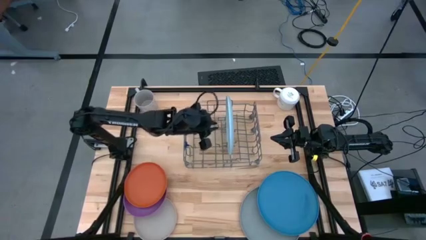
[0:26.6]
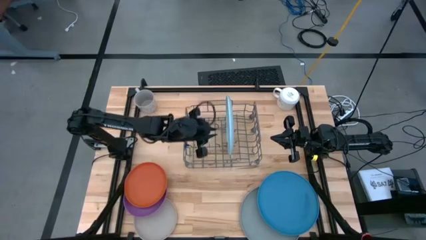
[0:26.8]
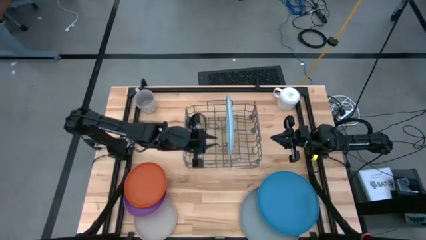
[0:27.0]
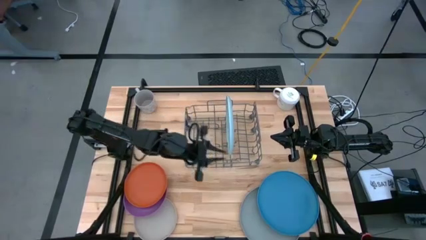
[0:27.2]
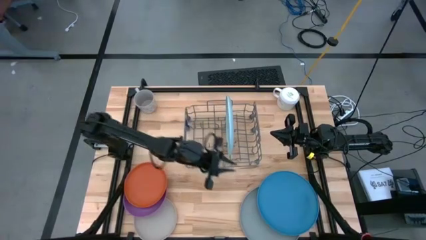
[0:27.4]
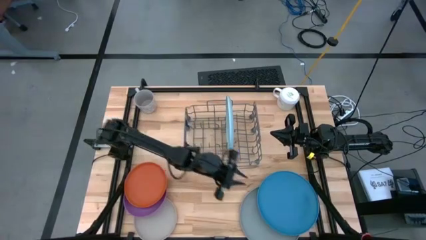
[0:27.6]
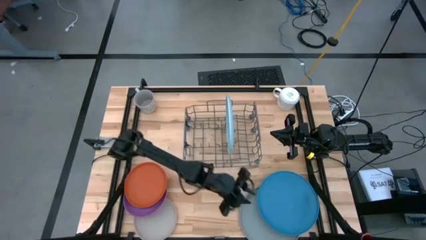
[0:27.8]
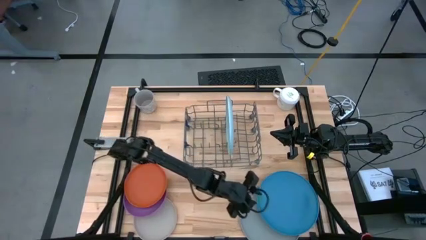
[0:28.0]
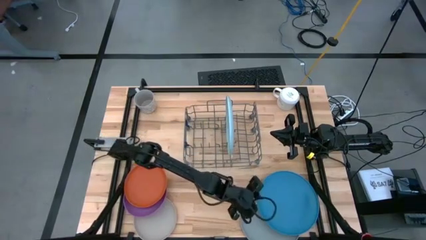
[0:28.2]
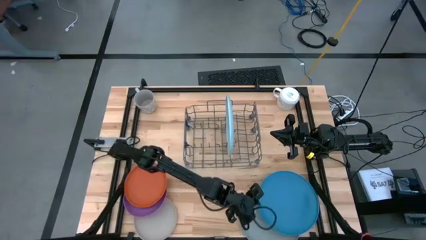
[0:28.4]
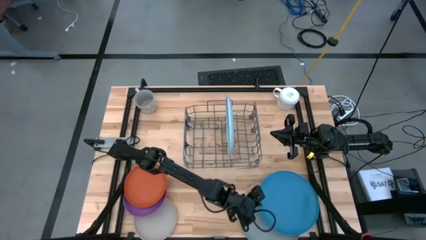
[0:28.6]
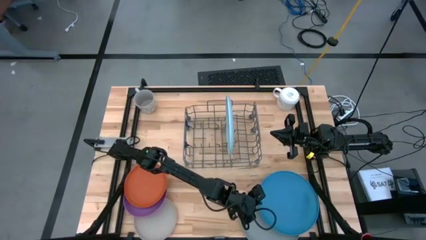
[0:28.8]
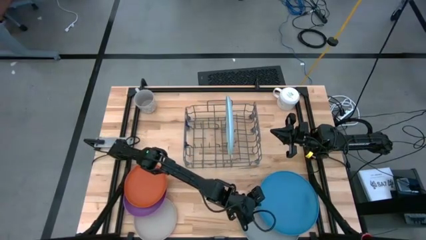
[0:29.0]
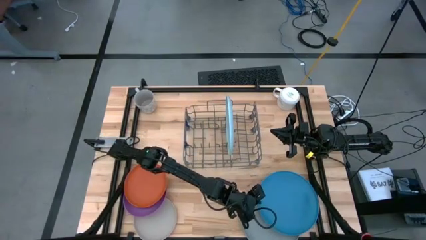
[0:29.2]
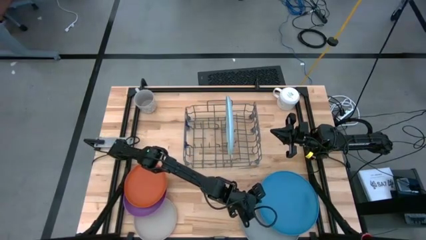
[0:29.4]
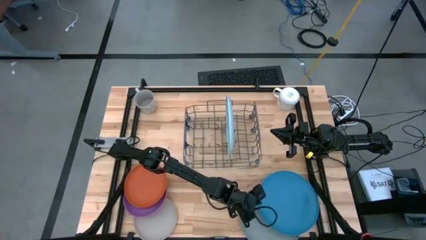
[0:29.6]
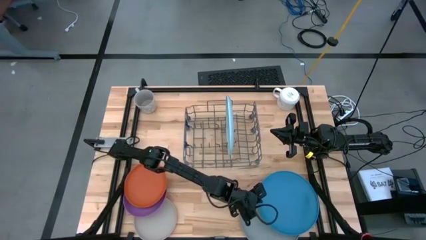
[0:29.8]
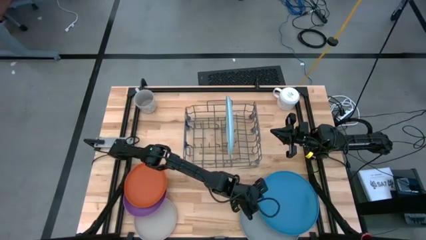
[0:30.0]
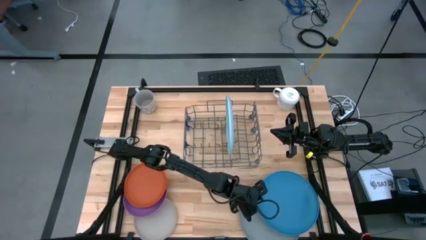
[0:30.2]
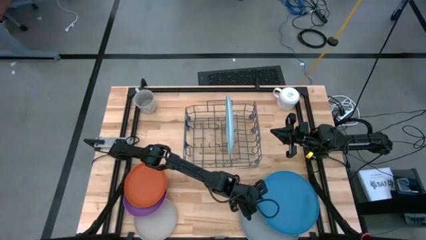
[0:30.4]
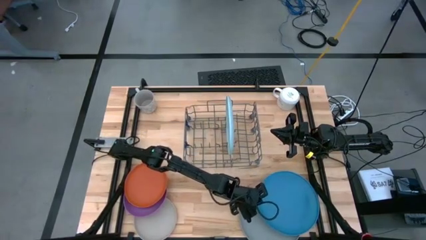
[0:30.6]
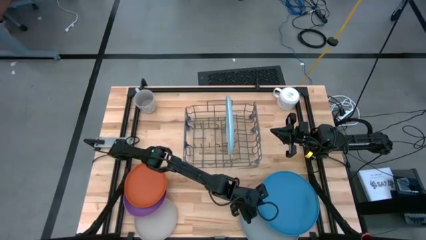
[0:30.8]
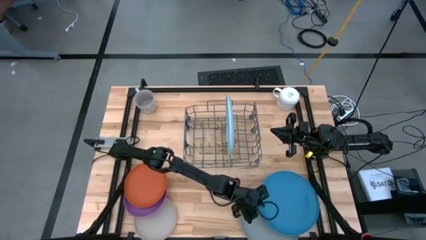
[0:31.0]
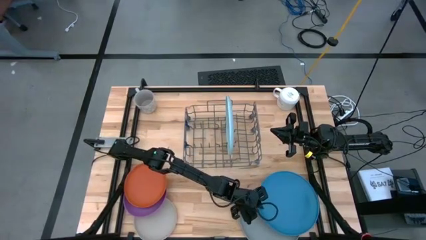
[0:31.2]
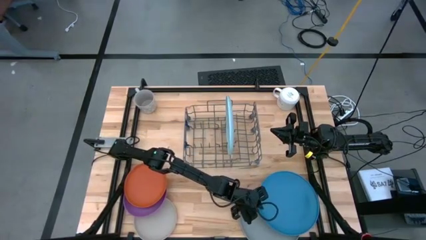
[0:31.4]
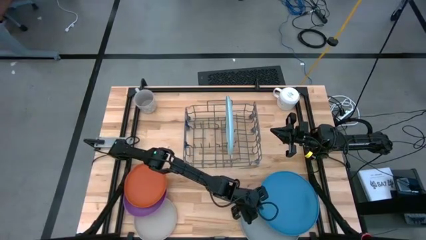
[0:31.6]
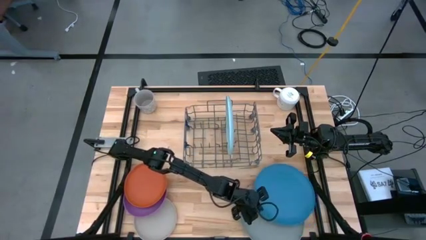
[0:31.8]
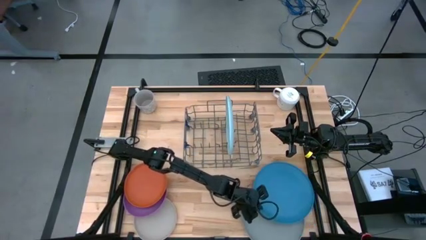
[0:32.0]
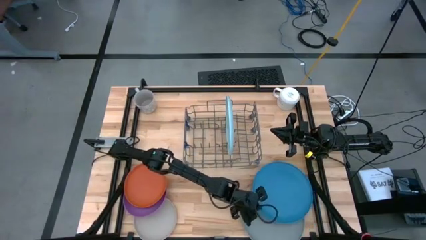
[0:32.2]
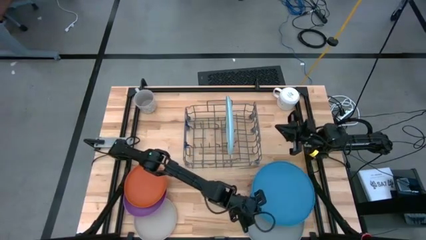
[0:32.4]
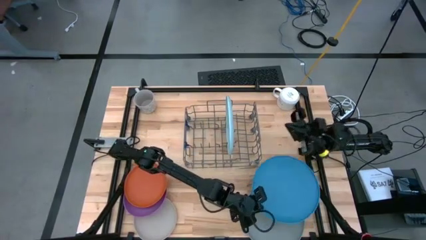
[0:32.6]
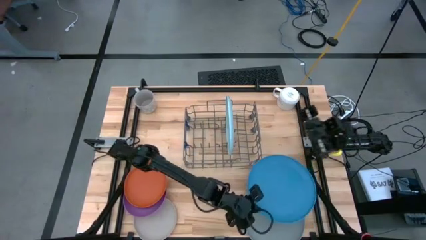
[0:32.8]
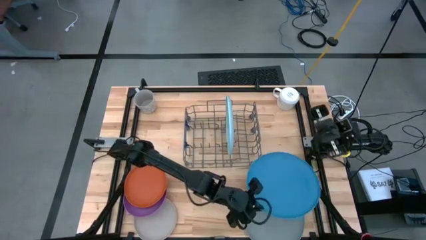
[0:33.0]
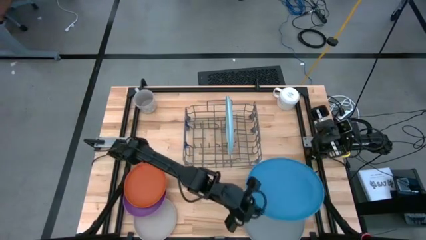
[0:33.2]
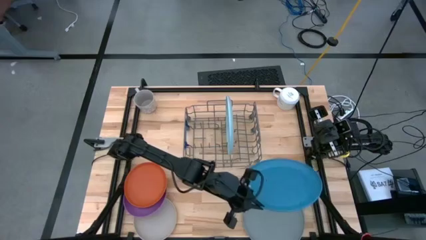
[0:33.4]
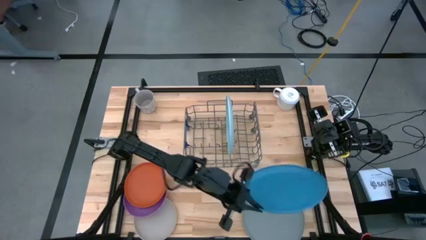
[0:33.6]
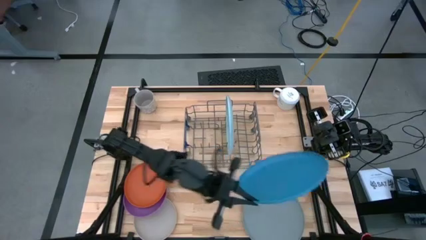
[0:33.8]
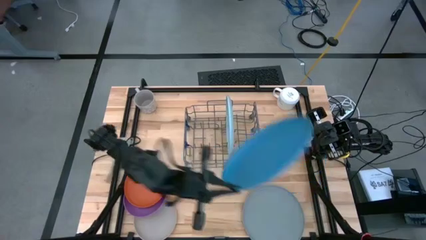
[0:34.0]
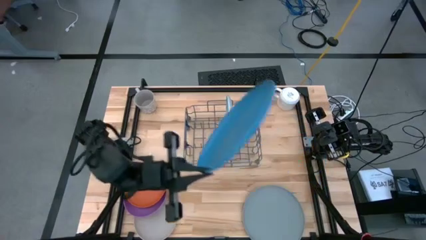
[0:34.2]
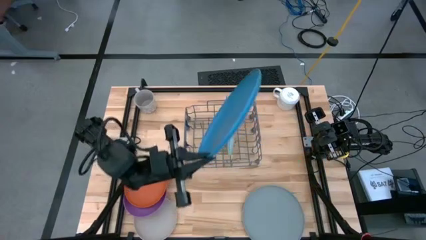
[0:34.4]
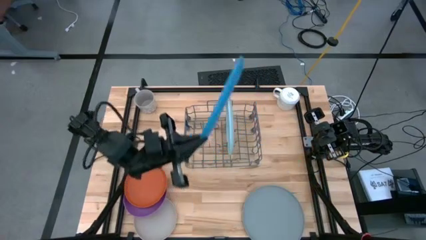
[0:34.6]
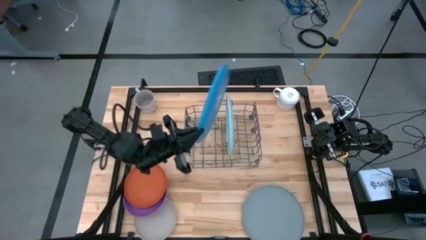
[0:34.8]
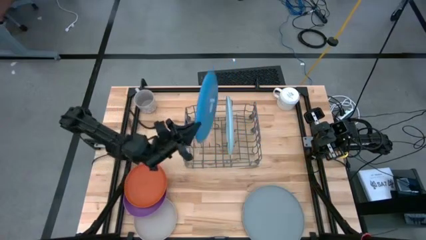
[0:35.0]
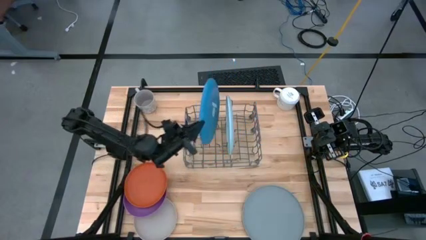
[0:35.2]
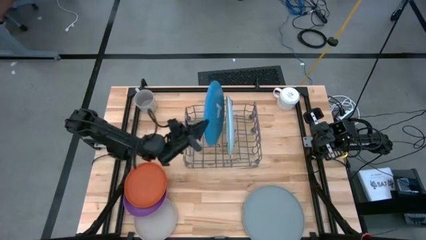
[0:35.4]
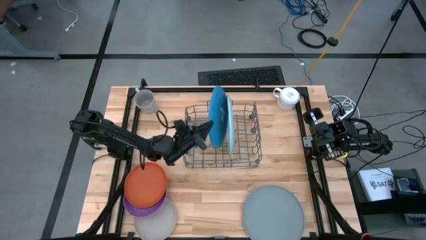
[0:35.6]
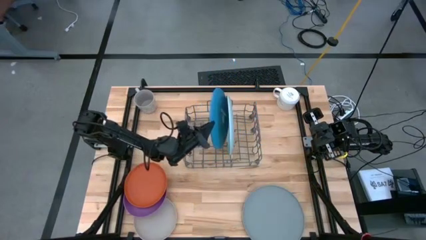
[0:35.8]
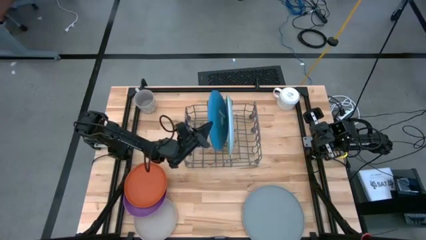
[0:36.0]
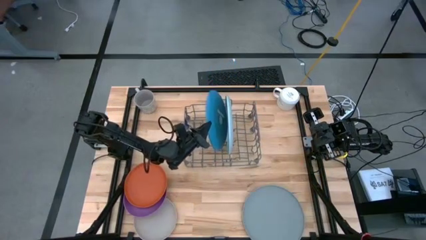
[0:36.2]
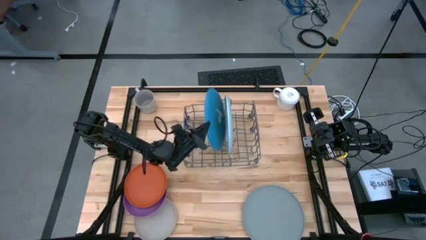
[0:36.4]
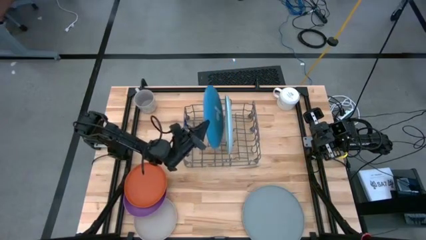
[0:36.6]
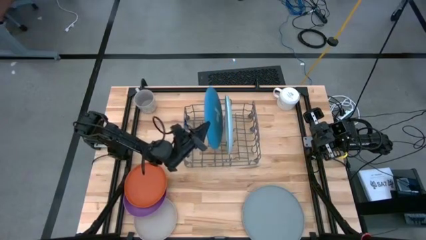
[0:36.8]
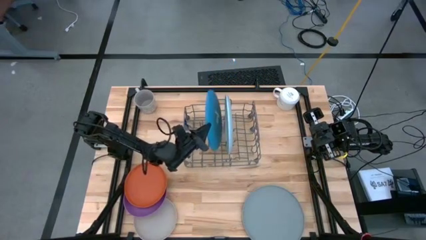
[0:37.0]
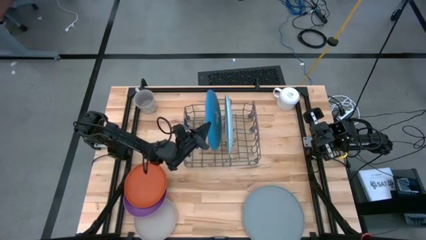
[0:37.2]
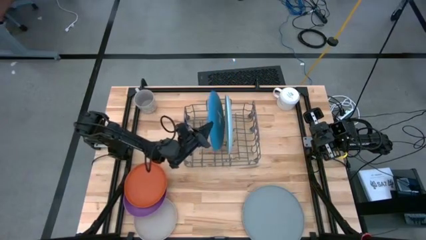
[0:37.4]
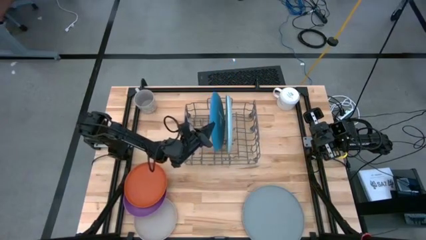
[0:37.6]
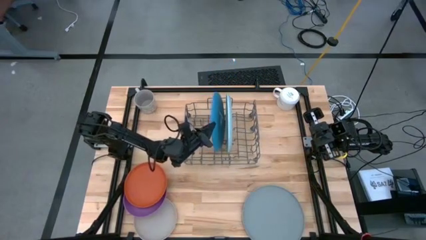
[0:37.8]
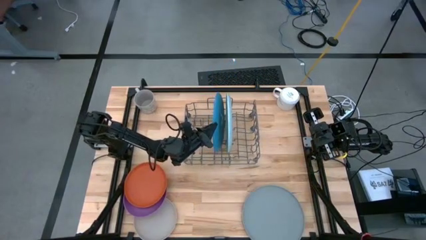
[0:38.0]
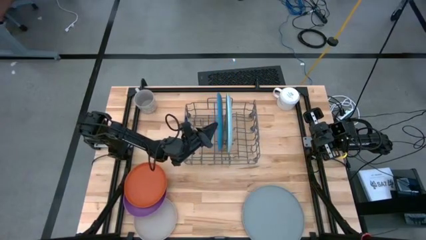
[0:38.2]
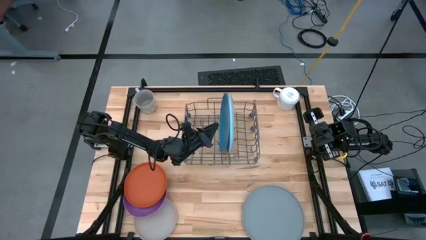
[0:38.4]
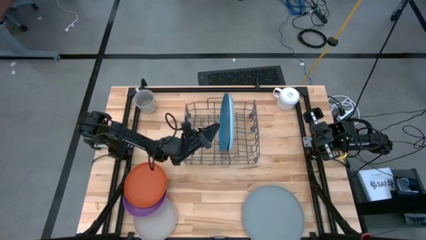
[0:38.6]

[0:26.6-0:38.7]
Task: Sort dishes
Put the blue plate in the dish rack

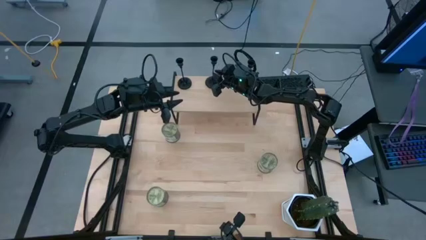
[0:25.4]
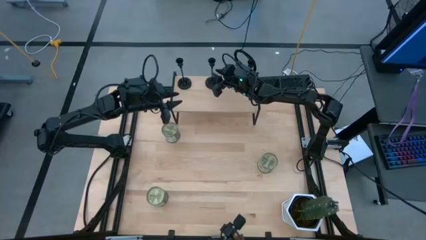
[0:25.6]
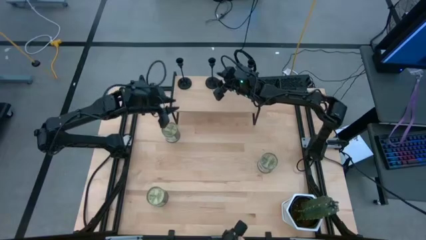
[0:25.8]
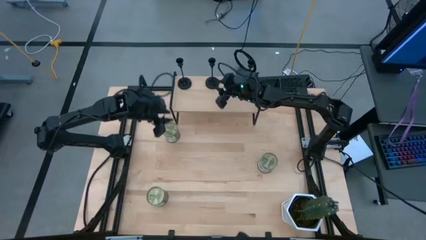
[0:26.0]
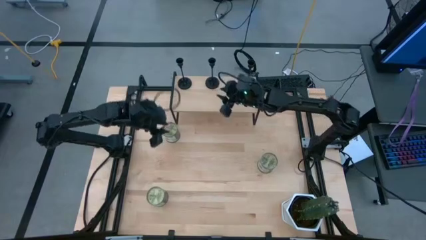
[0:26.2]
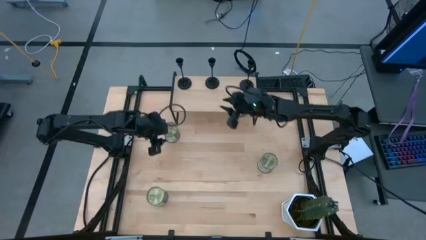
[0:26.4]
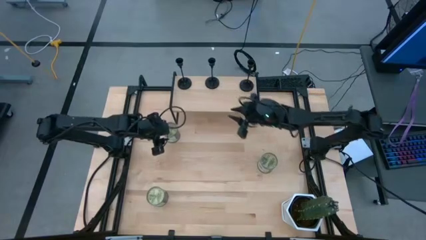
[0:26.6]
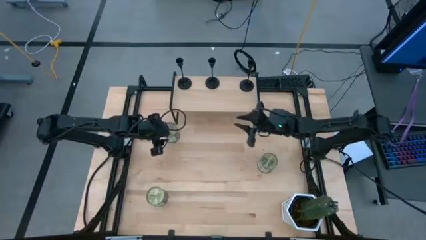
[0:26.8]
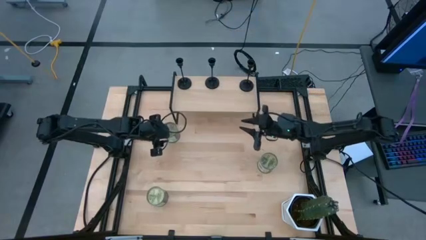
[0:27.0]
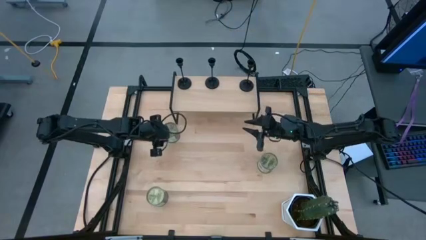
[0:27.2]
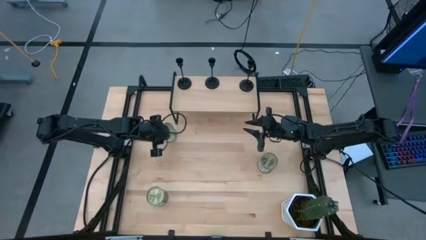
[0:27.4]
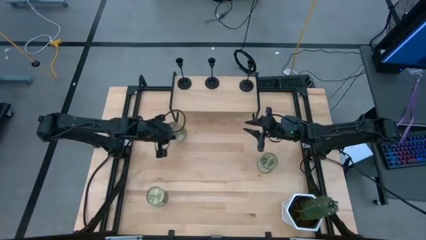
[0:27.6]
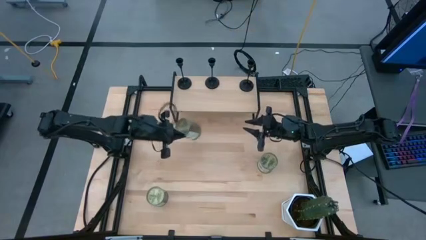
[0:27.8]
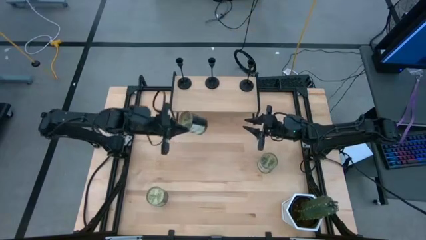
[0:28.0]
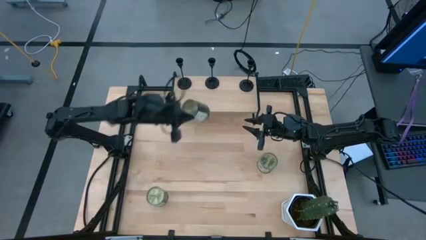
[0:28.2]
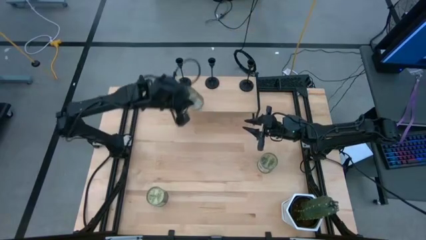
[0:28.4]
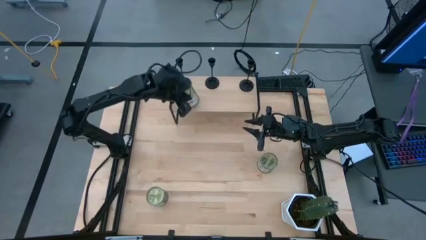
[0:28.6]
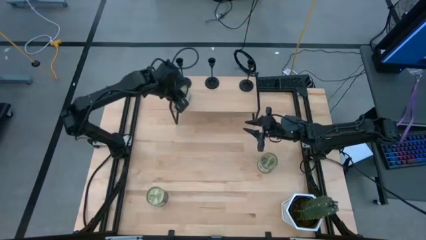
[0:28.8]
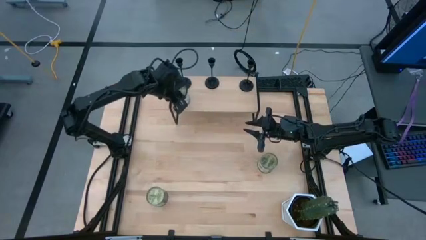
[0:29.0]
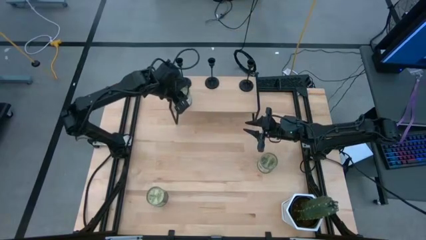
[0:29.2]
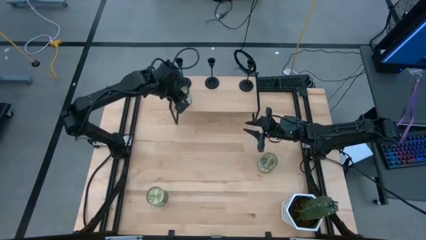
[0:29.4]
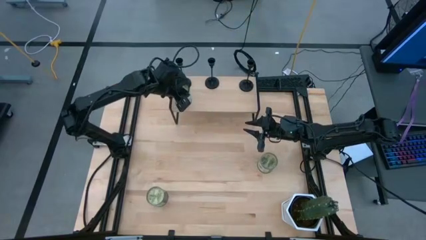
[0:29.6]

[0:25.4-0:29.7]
Task: Pick & Place candle stick holders
Put the top scented candle on the shelf

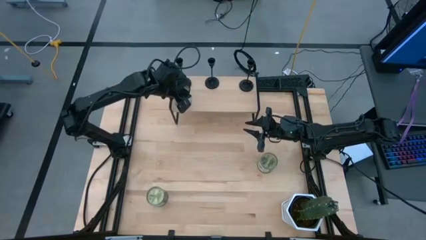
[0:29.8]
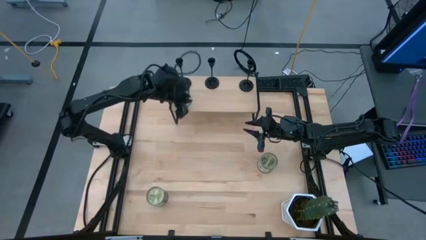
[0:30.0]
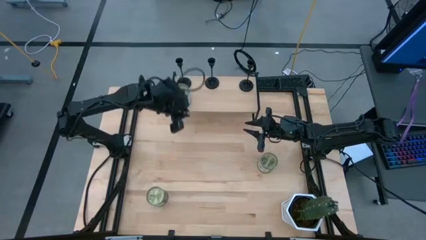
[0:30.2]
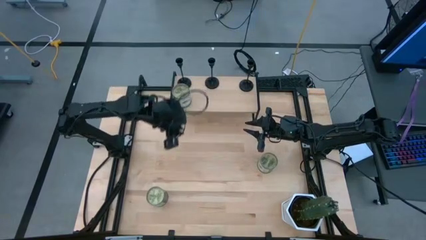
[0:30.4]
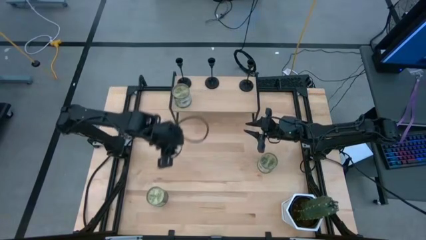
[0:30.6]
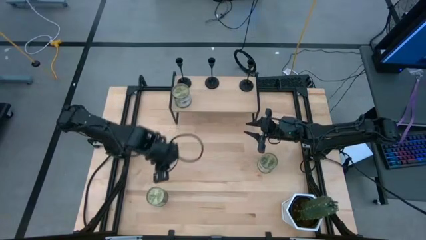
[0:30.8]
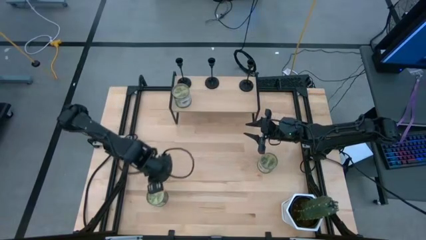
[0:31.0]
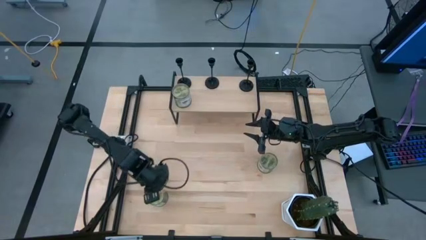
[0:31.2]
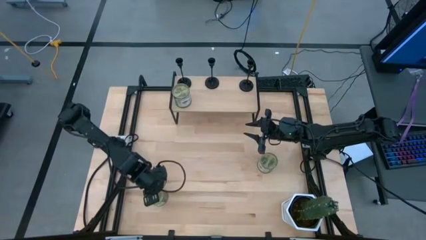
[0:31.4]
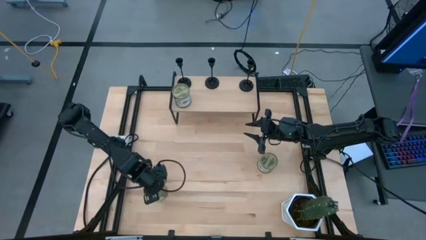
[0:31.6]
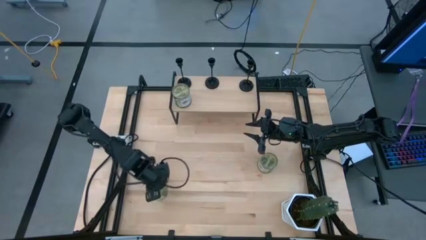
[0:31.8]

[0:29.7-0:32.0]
Put the bottom scented candle on the shelf
